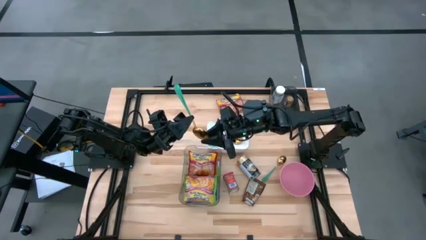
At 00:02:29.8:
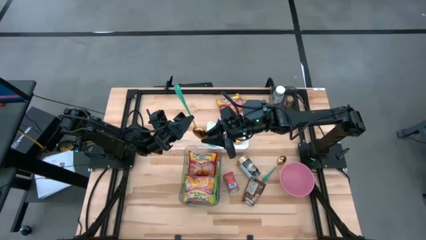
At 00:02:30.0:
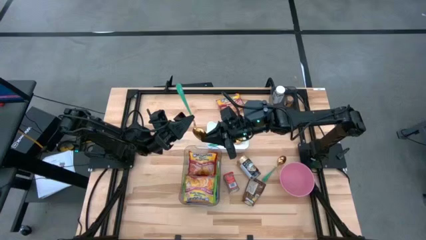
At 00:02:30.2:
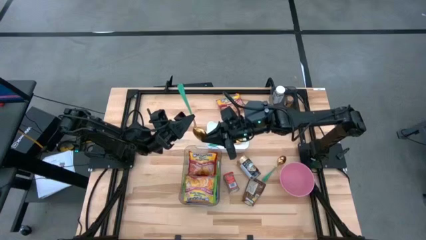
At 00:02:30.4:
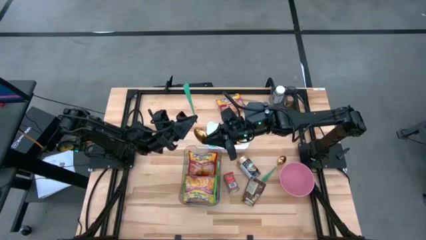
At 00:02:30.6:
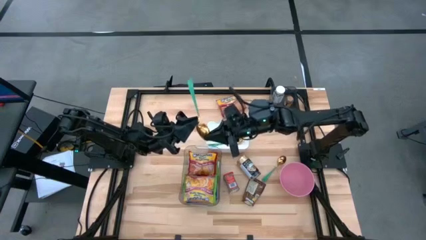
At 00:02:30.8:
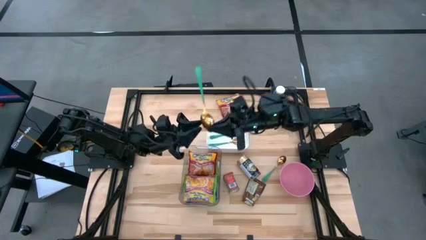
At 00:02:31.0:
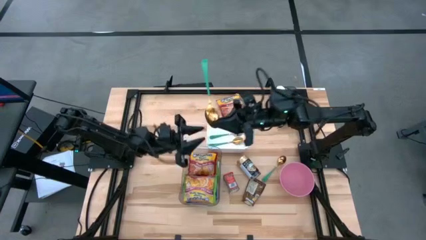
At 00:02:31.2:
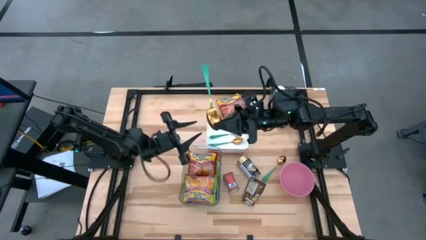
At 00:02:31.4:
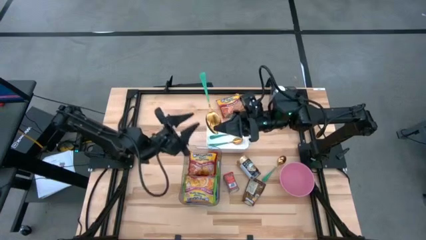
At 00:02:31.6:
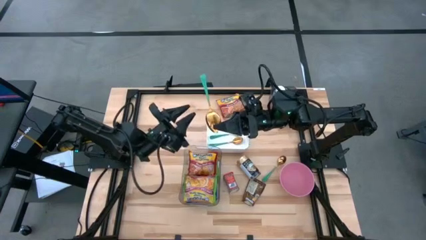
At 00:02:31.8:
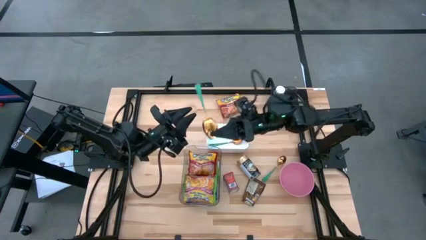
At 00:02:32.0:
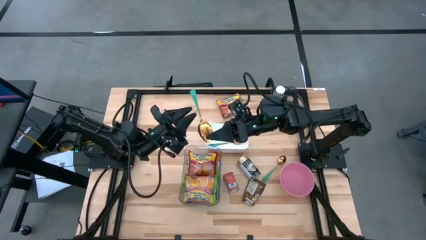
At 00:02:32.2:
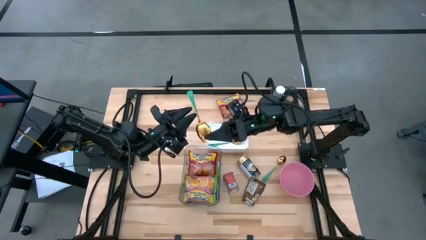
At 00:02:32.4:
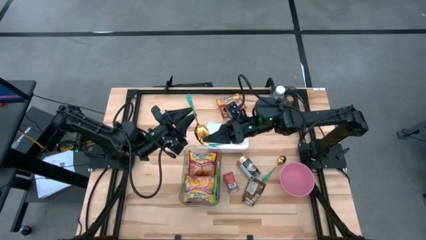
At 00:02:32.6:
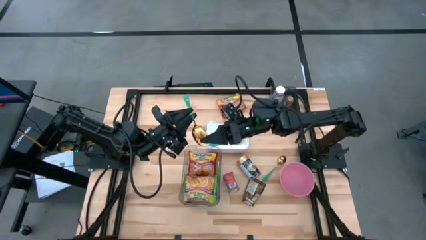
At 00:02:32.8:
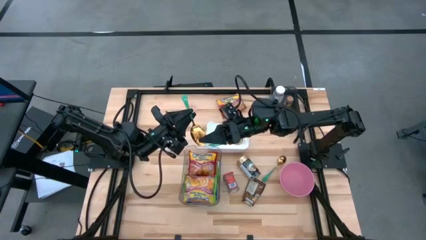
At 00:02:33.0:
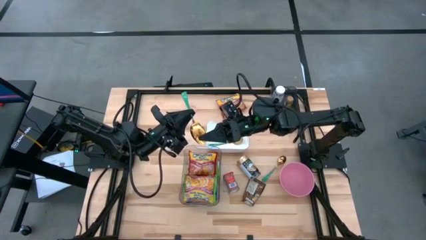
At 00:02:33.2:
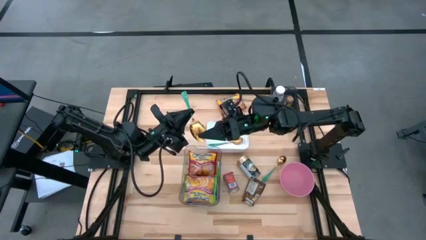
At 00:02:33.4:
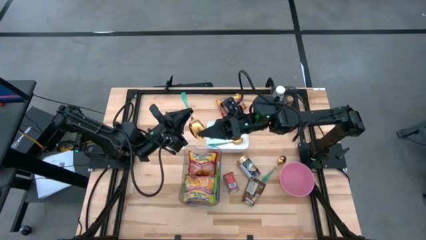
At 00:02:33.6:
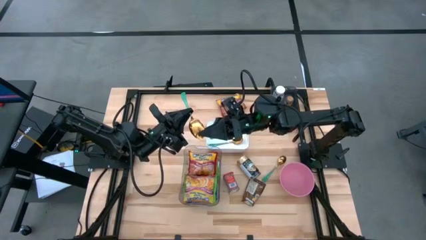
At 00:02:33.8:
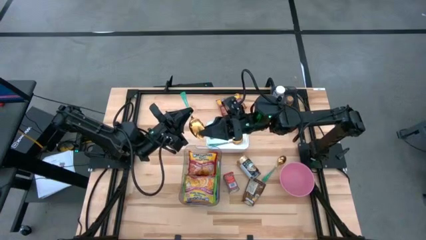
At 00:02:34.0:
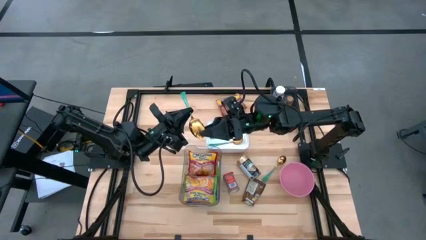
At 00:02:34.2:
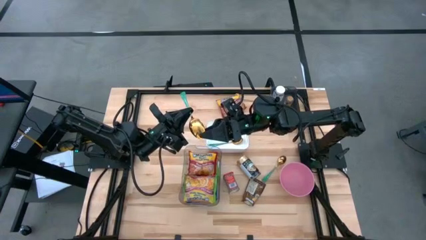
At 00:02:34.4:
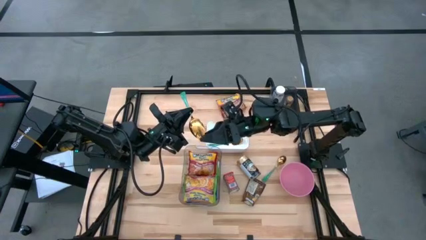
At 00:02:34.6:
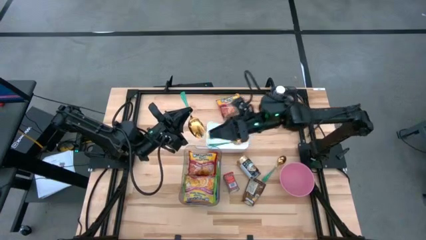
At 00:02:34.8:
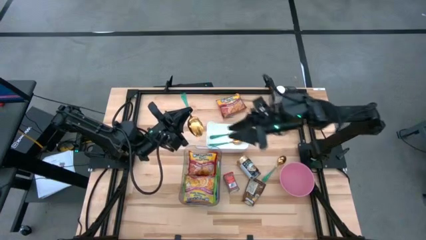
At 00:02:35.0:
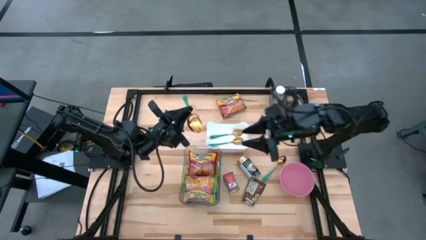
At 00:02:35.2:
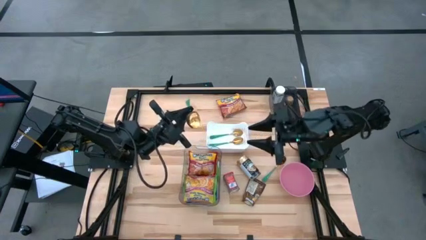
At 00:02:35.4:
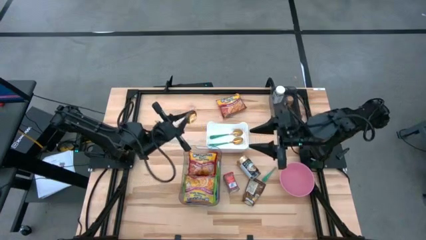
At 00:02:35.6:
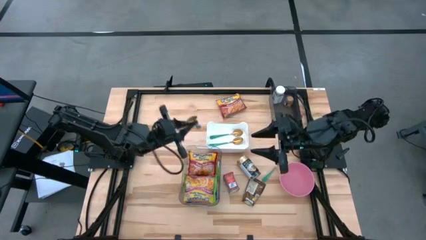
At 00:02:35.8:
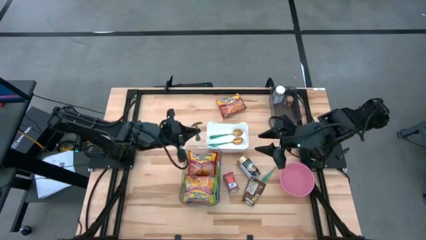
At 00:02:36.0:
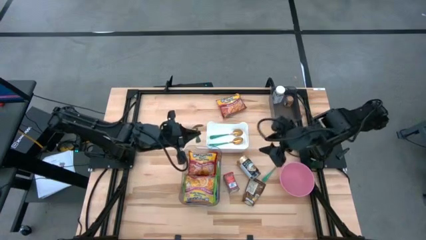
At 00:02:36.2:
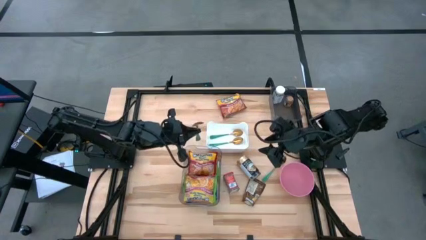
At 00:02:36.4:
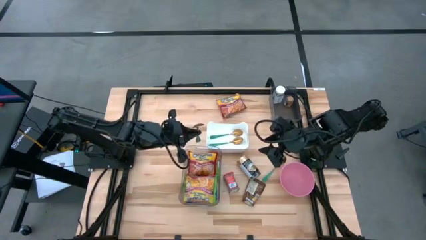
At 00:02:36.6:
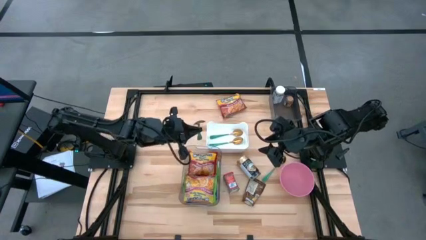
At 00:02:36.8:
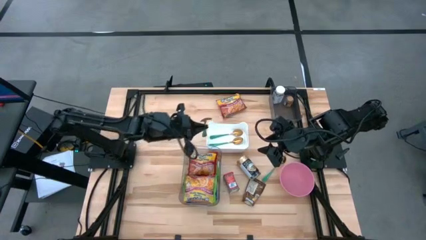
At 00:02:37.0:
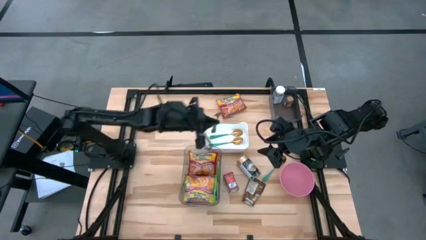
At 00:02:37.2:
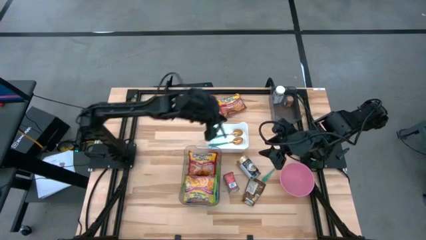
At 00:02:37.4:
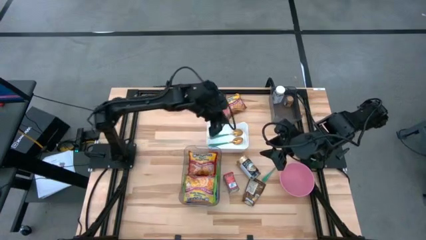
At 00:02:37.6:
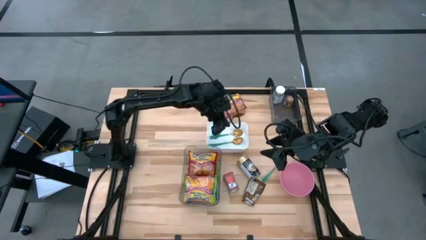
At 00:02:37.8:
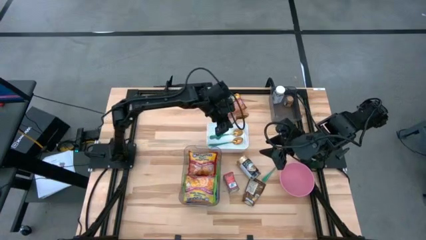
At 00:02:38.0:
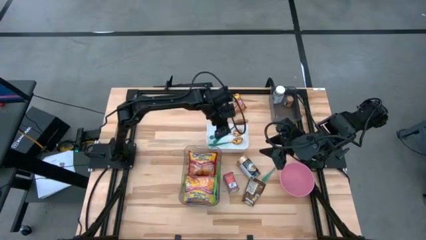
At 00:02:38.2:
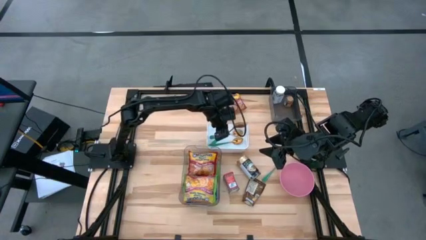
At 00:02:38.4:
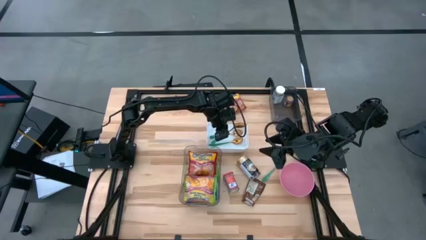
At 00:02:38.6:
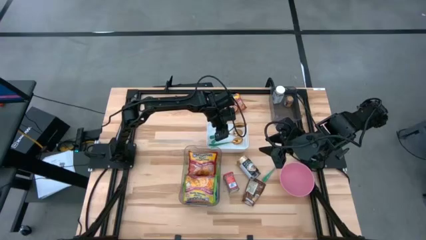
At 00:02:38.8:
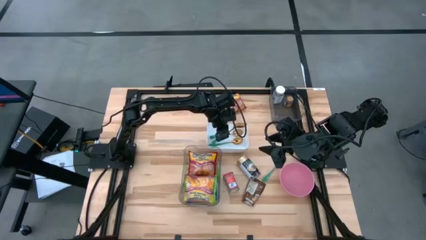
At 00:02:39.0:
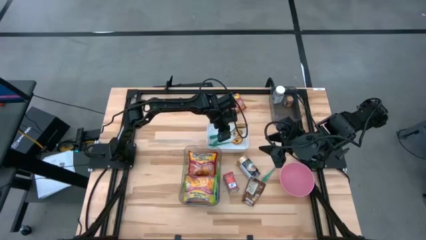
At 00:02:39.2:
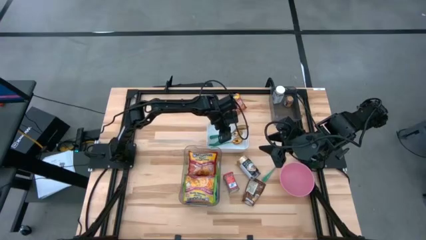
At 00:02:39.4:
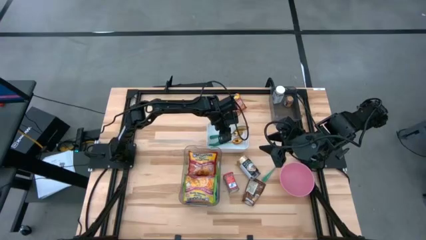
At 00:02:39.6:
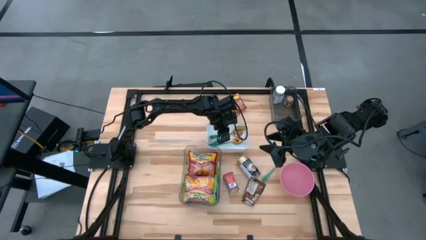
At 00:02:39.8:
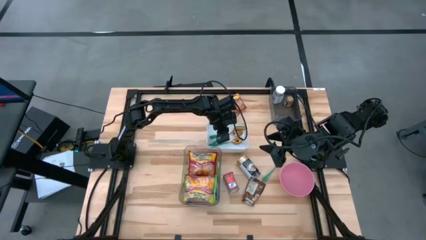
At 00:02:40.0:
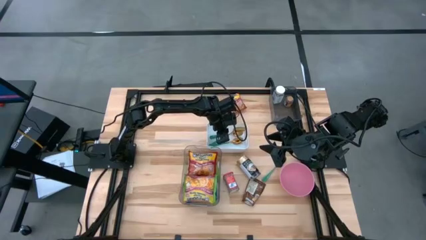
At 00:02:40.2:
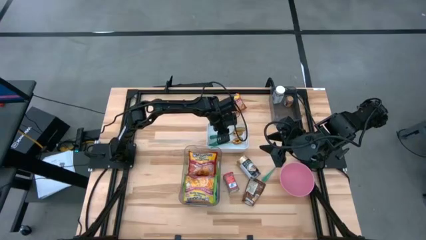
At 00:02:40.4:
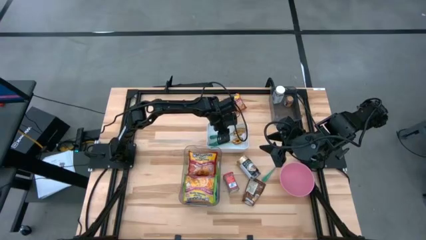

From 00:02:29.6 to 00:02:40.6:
Task: Pick & Place Food Item
Put the green spoon into the white bin
